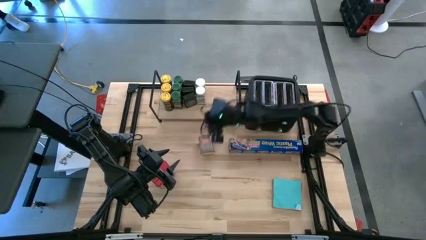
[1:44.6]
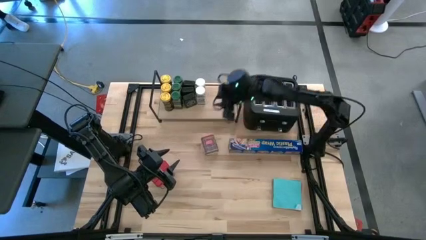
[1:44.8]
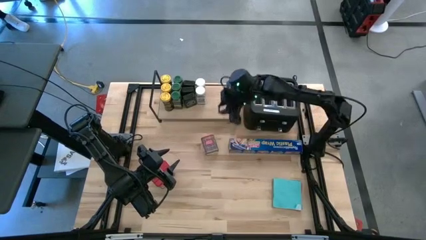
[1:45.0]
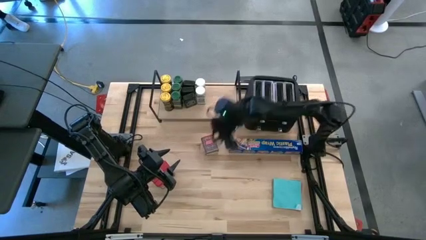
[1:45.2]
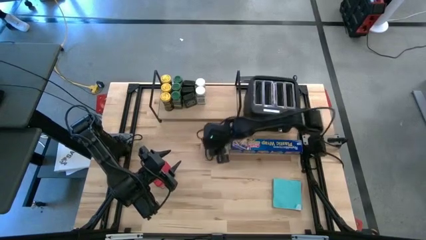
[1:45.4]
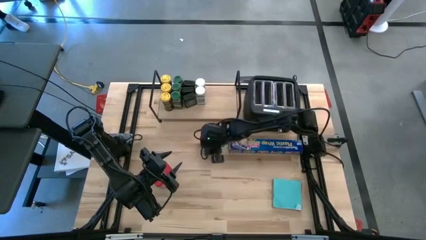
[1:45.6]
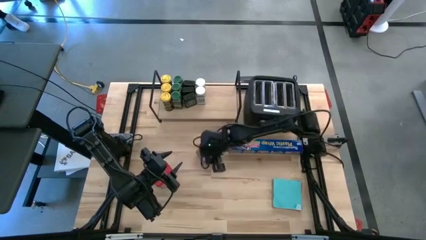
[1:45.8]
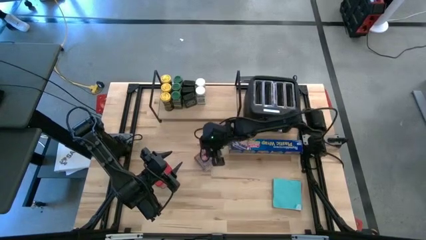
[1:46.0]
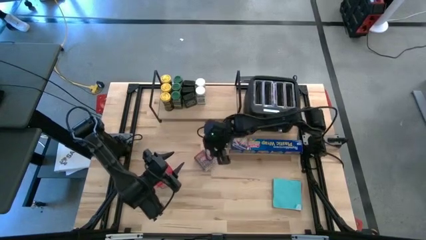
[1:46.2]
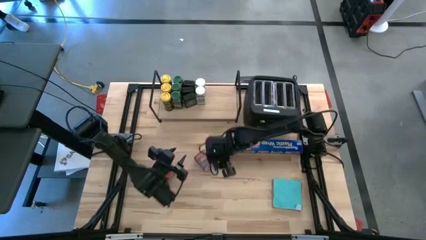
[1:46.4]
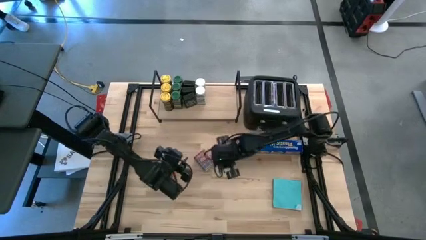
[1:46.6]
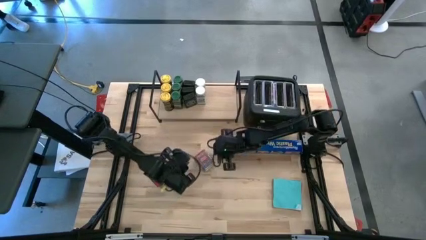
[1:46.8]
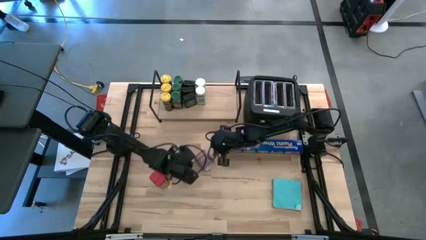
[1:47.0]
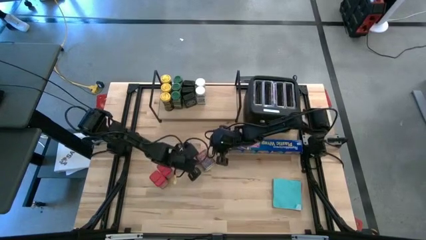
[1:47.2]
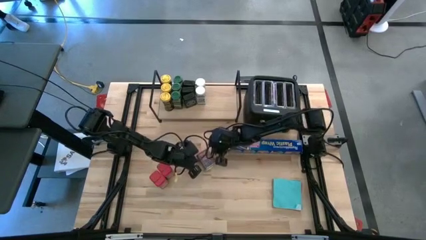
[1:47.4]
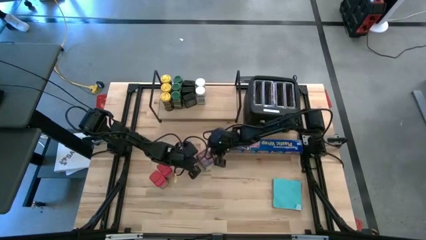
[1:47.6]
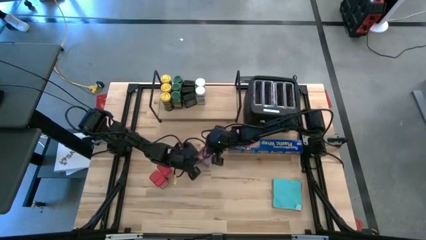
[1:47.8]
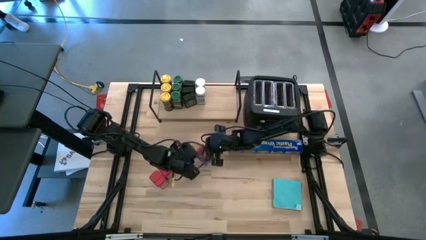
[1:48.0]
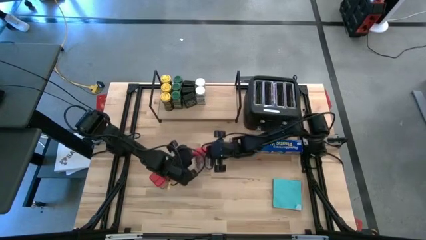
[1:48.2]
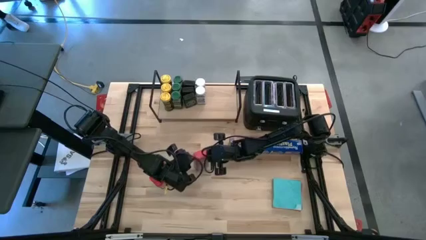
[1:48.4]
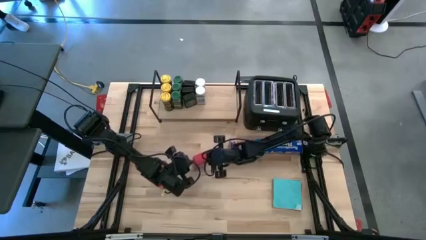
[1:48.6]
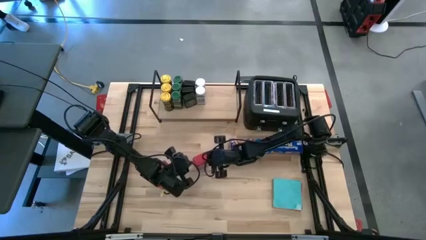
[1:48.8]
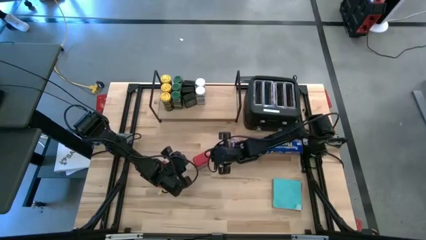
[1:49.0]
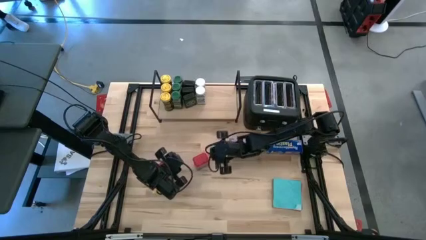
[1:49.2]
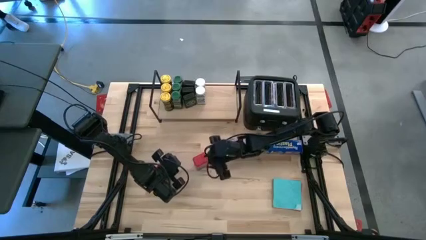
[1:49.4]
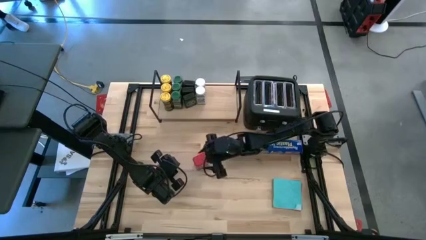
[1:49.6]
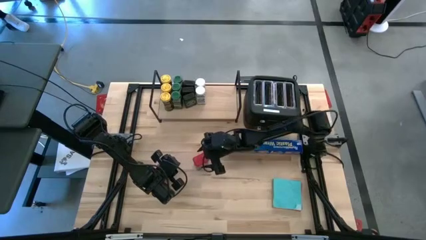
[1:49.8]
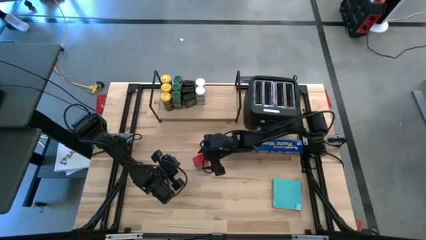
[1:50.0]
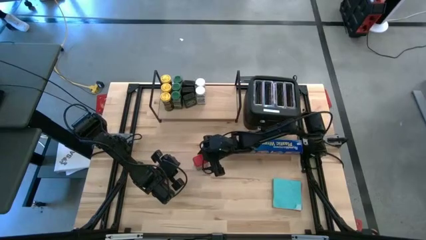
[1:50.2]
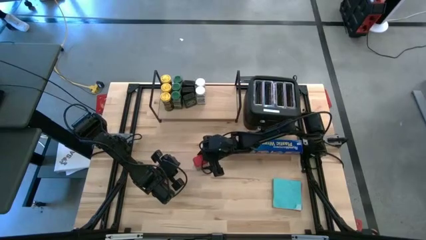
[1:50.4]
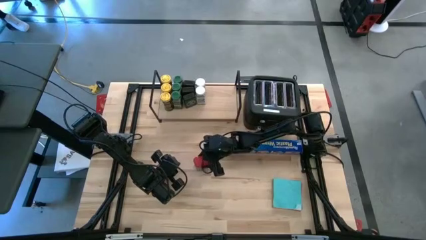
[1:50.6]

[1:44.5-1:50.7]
Task: Shelf spices
Put the right red seasoning container on the shelf

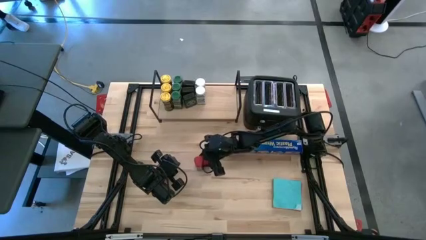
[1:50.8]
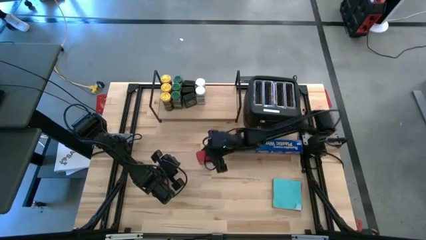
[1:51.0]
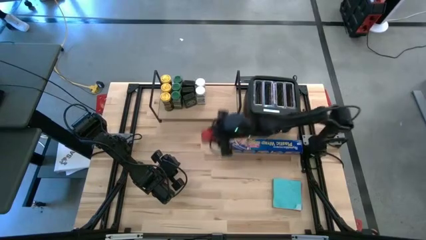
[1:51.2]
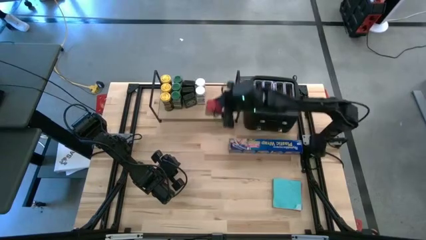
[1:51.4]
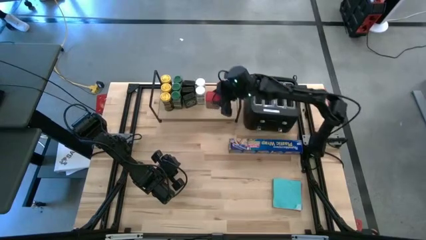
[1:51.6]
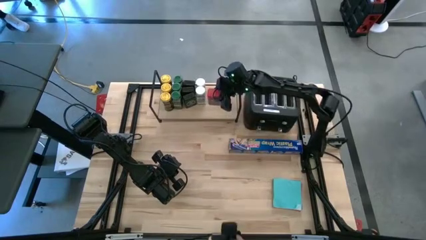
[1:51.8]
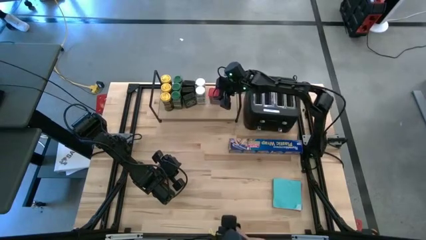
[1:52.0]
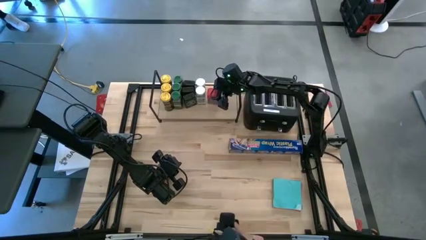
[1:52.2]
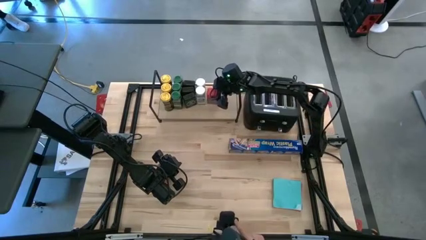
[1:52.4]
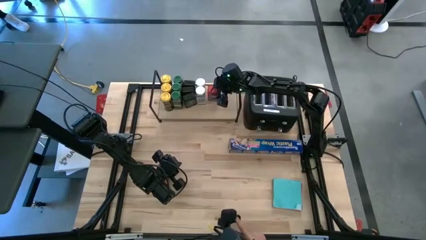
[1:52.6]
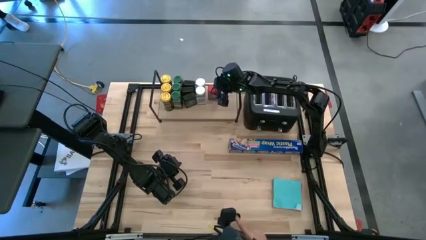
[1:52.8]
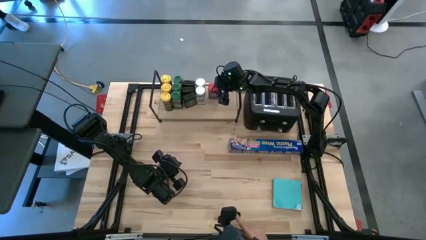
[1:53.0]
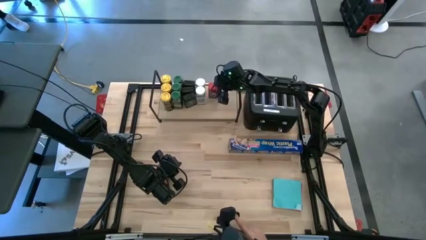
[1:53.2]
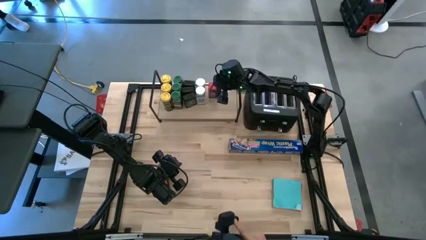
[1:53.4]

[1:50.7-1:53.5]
Put the right red seasoning container on the shelf

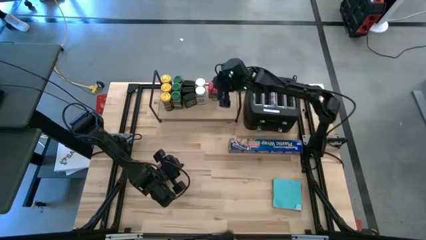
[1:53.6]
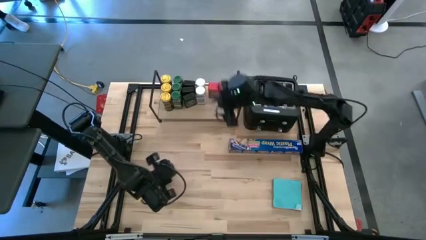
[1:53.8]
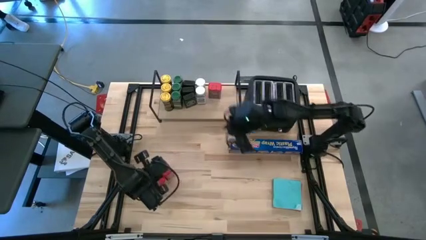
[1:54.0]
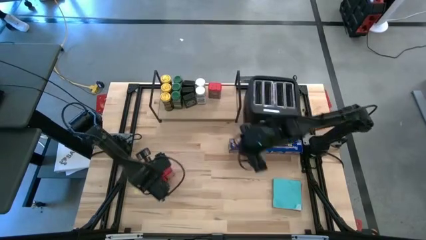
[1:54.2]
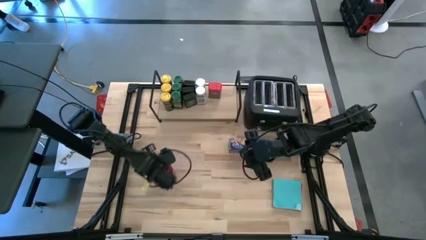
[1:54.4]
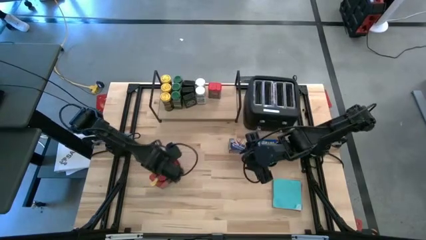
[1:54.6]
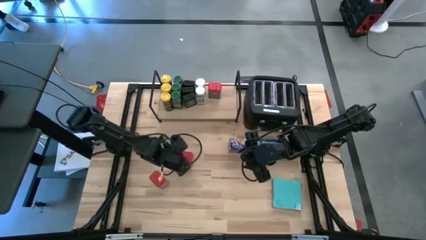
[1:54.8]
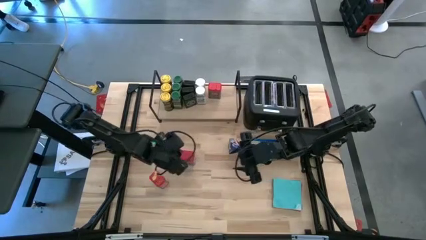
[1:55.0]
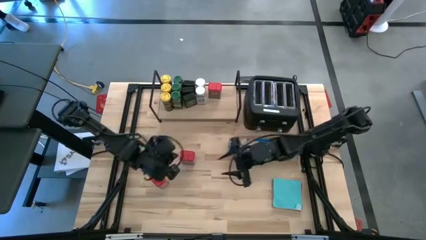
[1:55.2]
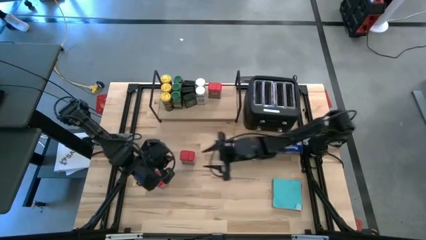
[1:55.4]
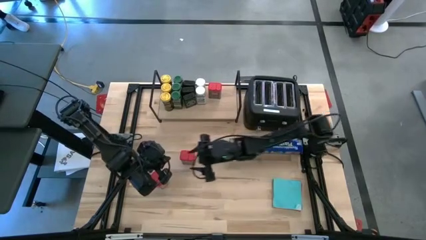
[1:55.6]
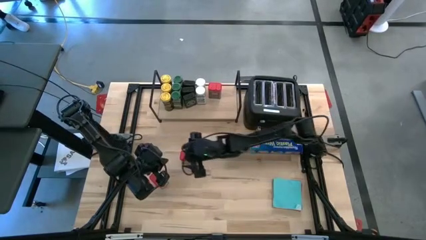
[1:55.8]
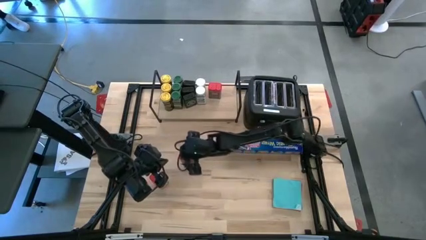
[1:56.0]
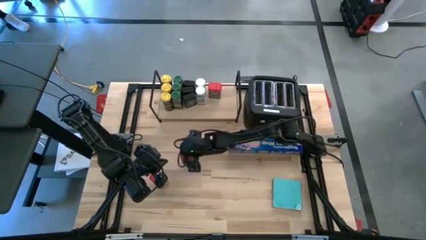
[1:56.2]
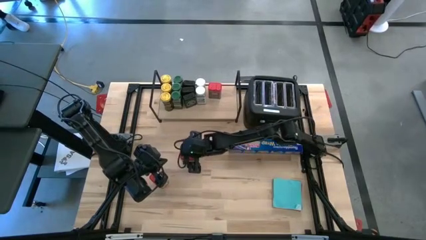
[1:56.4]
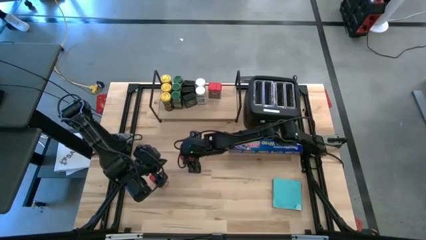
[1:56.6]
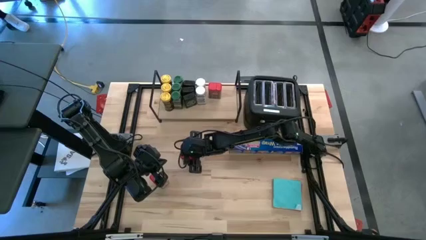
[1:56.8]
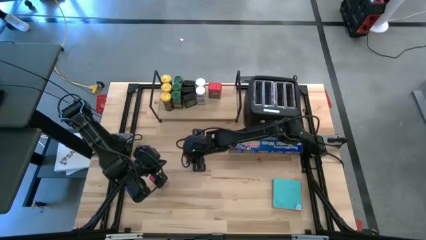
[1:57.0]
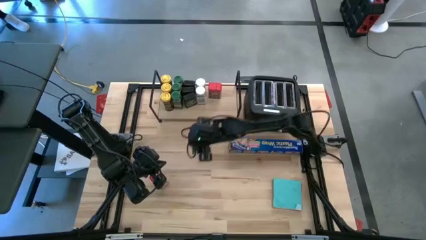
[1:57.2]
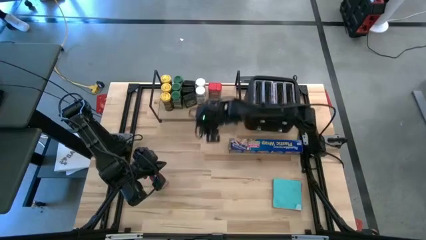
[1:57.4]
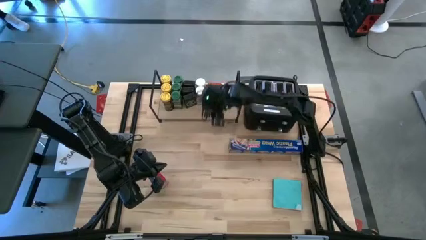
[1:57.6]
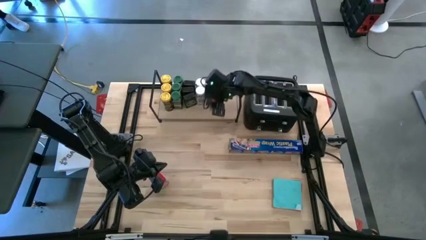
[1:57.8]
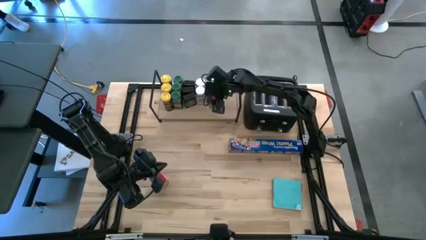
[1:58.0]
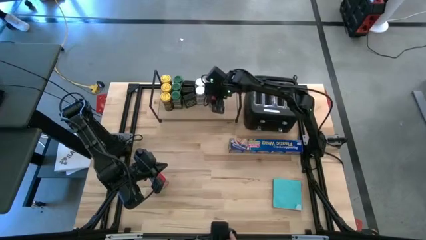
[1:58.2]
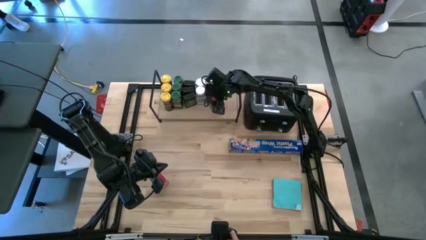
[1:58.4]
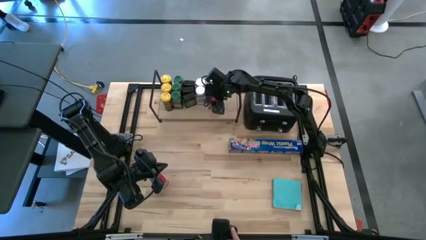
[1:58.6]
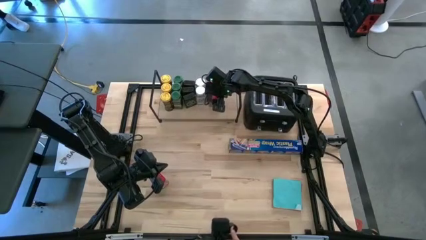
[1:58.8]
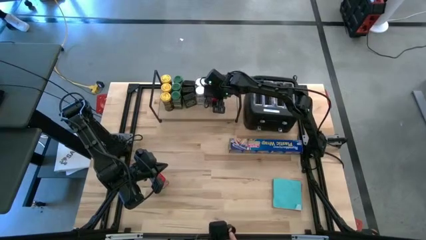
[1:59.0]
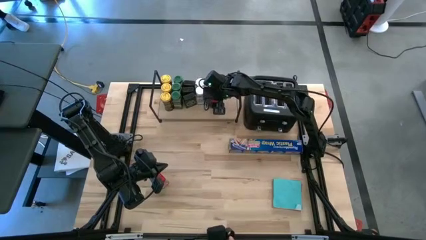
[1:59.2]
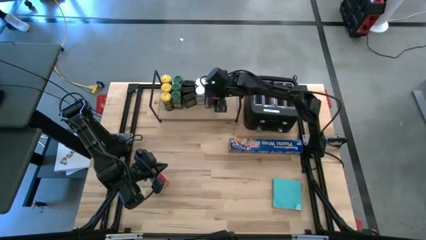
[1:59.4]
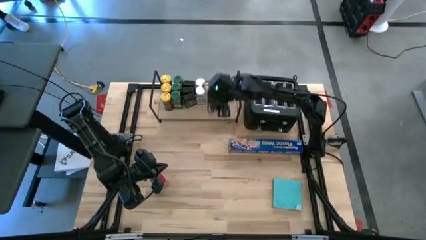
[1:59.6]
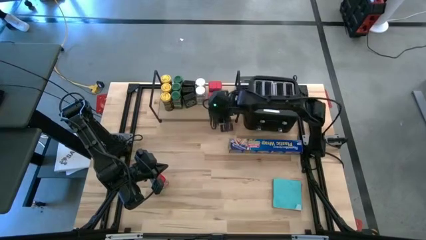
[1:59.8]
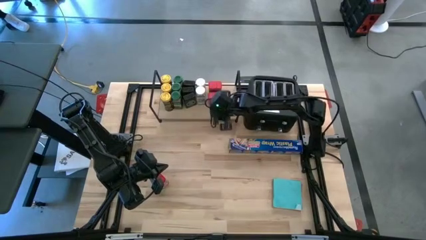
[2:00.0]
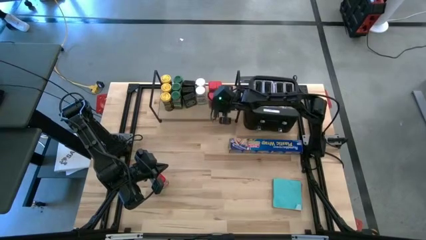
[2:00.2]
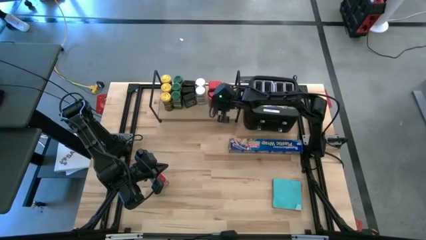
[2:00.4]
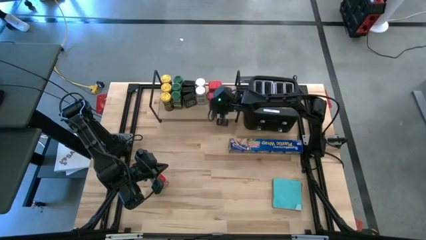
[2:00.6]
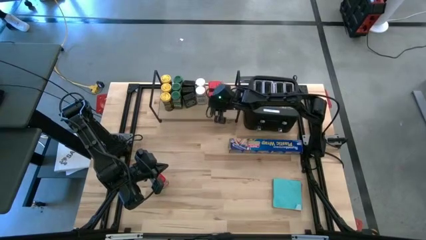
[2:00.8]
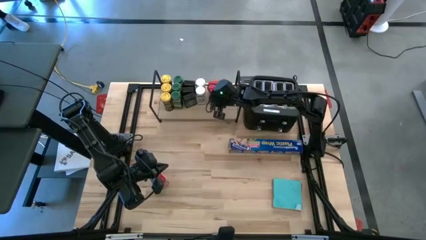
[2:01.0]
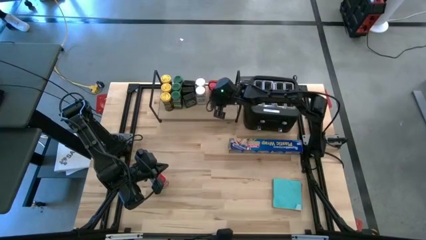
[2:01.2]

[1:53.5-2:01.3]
Put the right red seasoning container on the shelf aligned with the other red seasoning container
